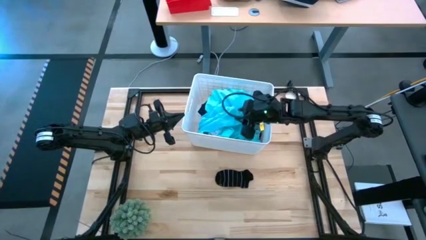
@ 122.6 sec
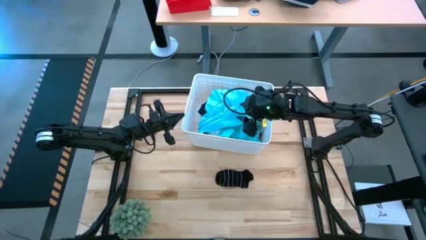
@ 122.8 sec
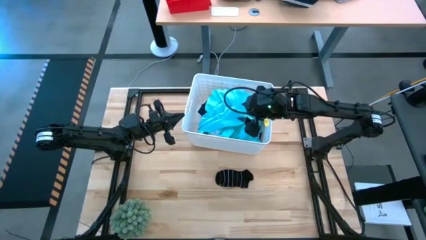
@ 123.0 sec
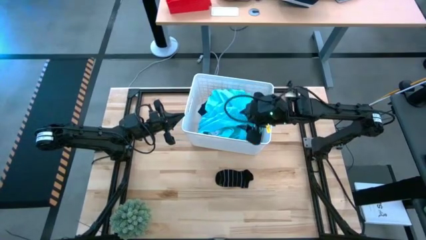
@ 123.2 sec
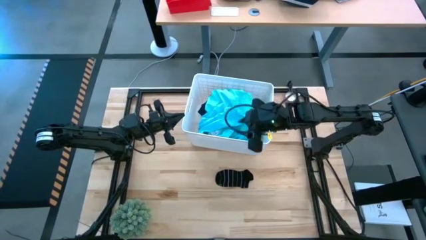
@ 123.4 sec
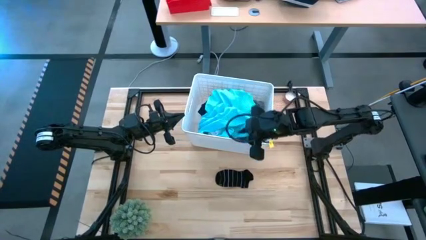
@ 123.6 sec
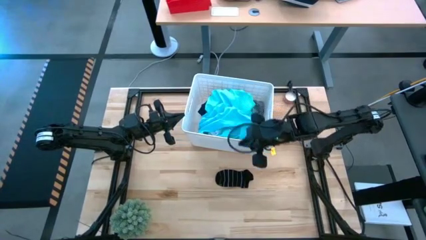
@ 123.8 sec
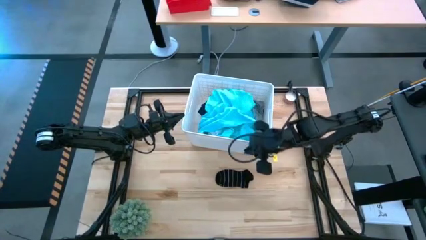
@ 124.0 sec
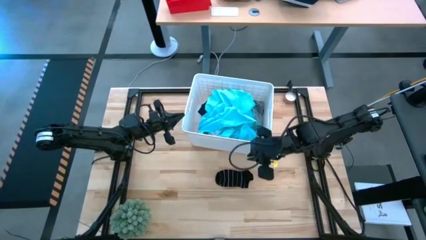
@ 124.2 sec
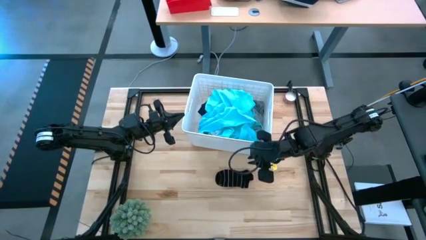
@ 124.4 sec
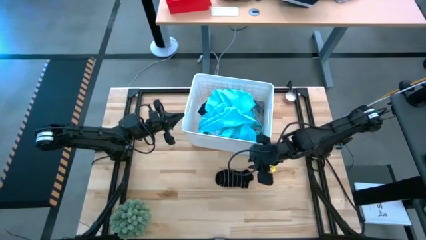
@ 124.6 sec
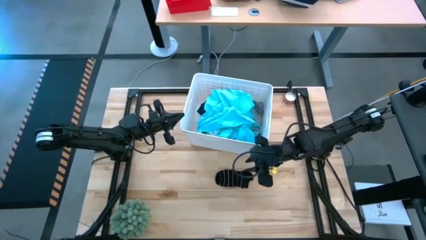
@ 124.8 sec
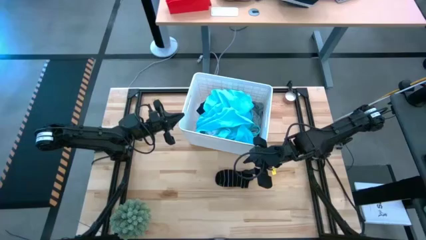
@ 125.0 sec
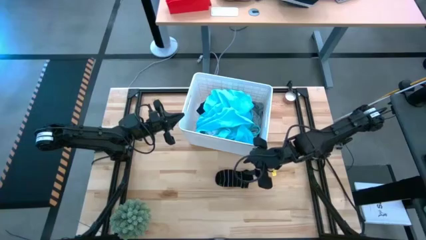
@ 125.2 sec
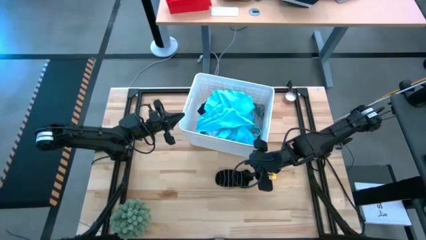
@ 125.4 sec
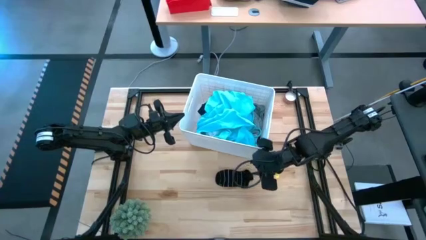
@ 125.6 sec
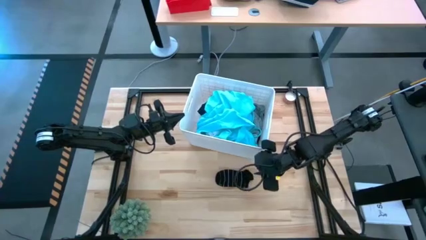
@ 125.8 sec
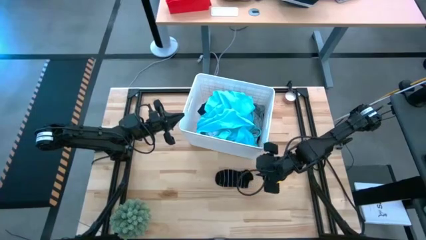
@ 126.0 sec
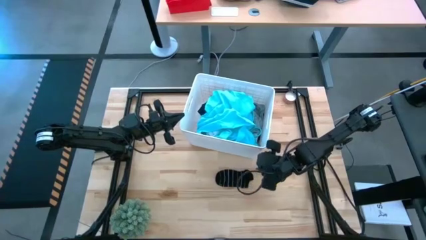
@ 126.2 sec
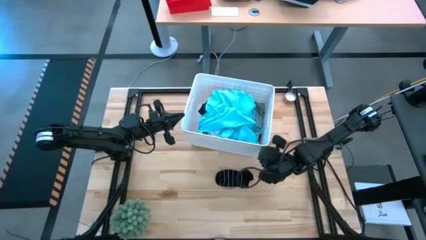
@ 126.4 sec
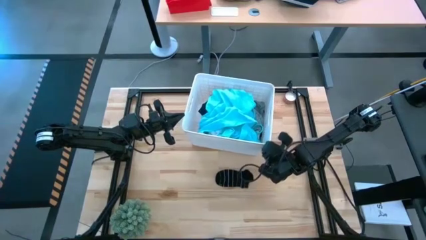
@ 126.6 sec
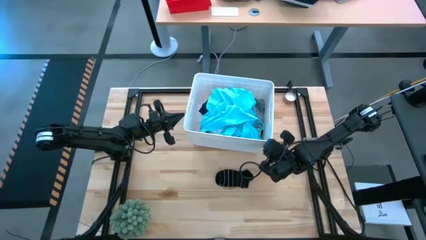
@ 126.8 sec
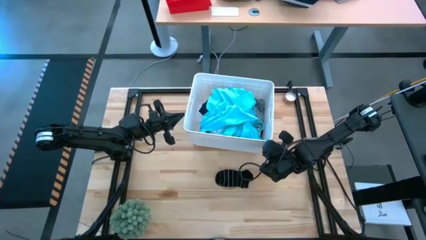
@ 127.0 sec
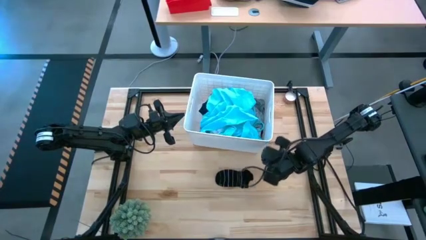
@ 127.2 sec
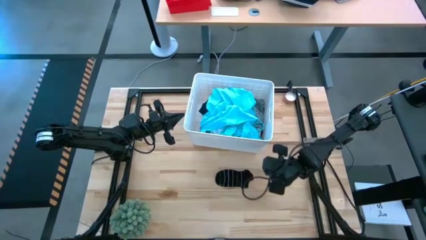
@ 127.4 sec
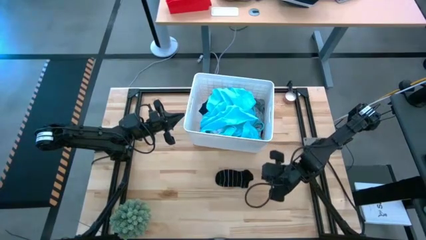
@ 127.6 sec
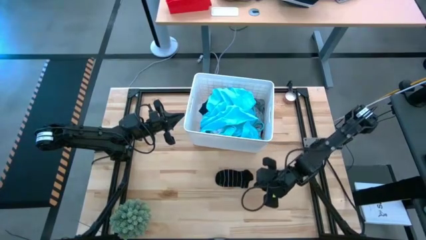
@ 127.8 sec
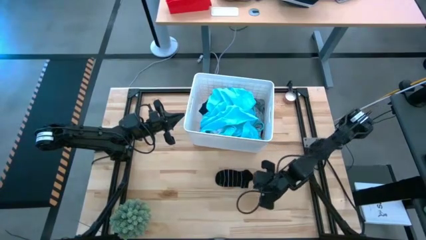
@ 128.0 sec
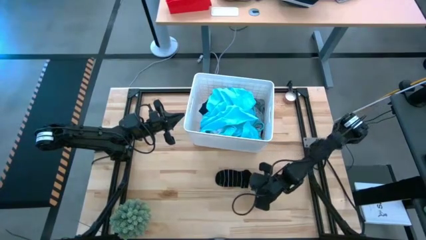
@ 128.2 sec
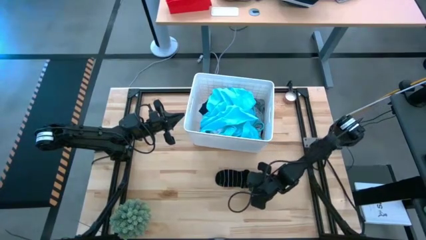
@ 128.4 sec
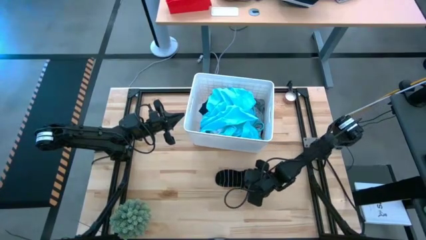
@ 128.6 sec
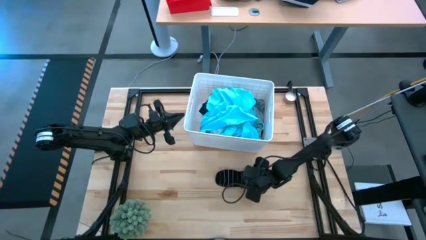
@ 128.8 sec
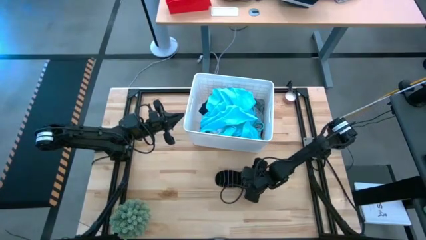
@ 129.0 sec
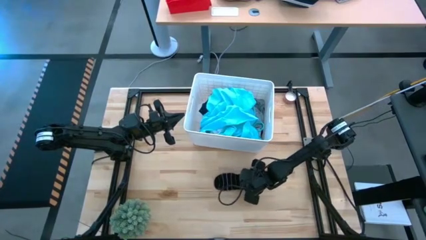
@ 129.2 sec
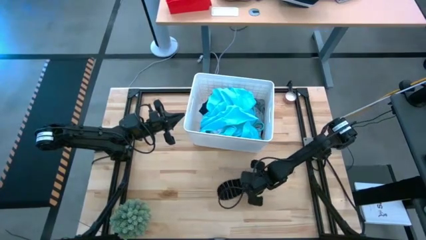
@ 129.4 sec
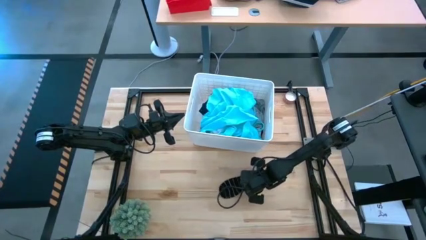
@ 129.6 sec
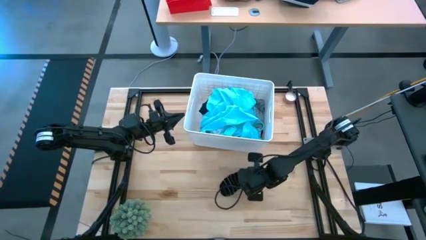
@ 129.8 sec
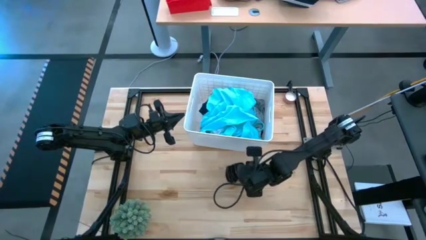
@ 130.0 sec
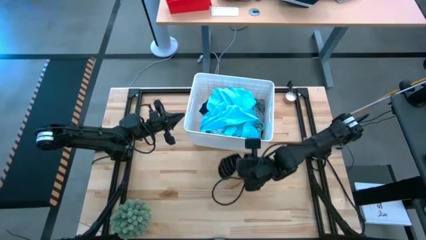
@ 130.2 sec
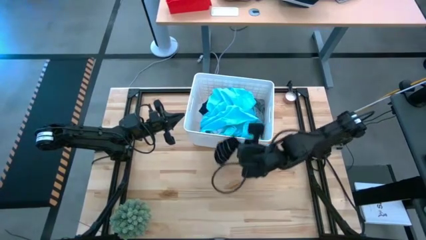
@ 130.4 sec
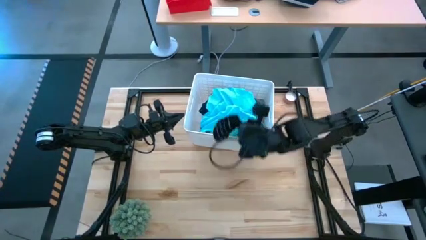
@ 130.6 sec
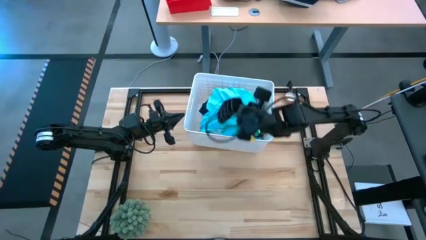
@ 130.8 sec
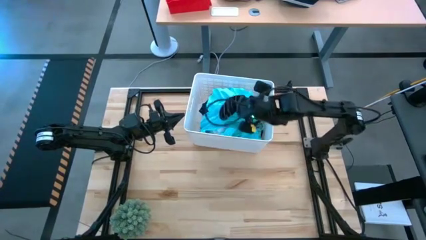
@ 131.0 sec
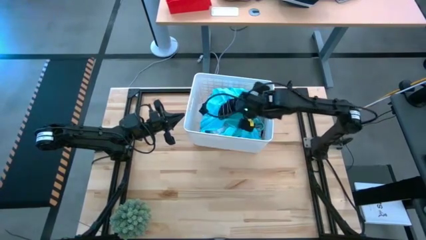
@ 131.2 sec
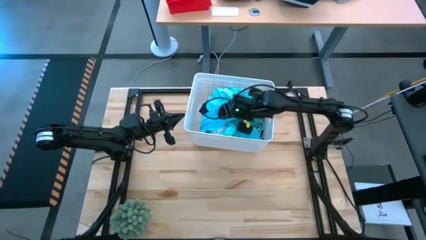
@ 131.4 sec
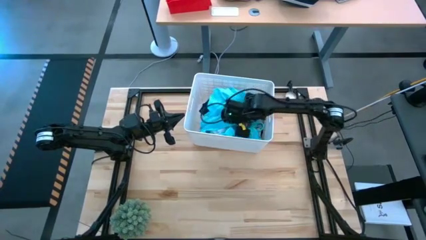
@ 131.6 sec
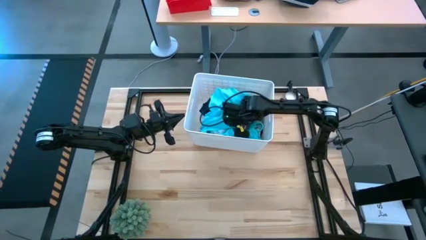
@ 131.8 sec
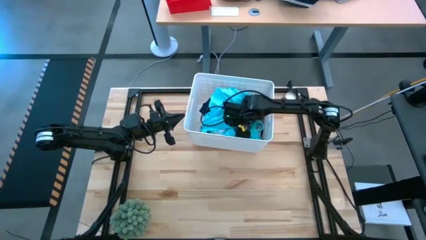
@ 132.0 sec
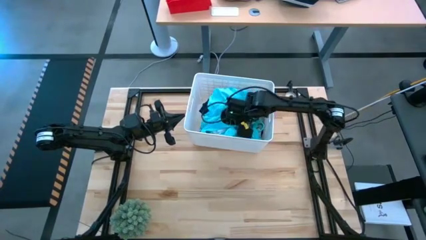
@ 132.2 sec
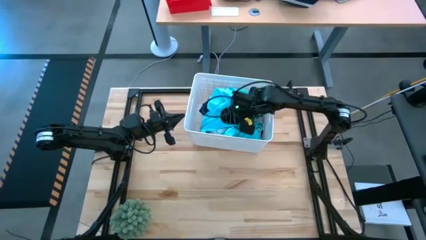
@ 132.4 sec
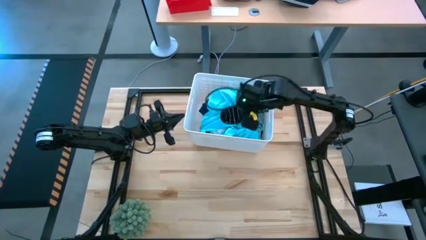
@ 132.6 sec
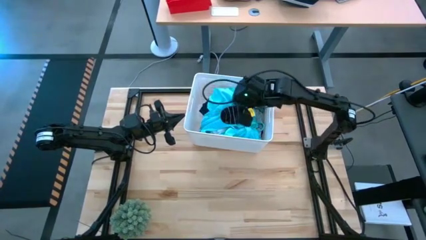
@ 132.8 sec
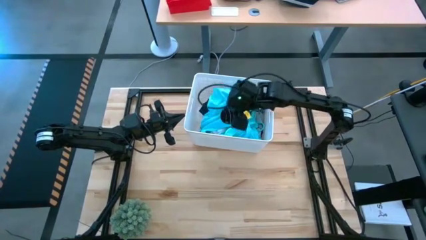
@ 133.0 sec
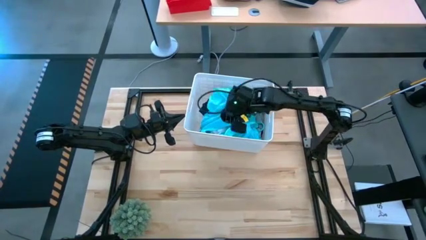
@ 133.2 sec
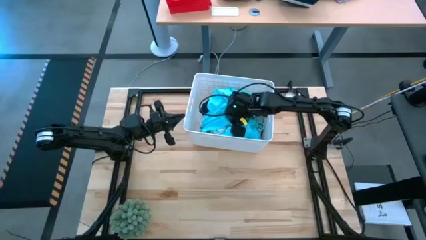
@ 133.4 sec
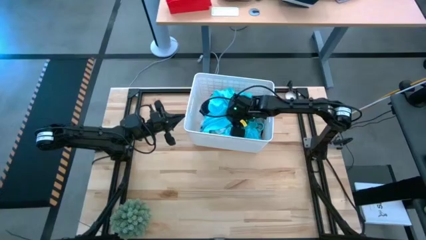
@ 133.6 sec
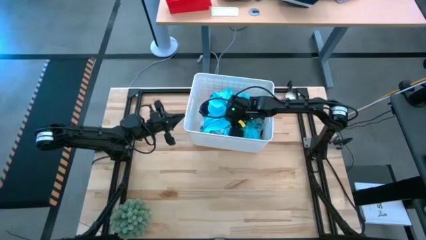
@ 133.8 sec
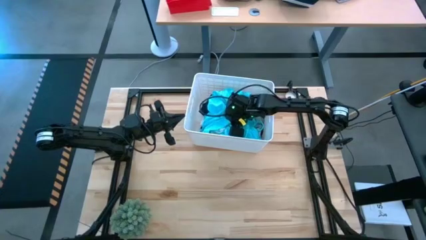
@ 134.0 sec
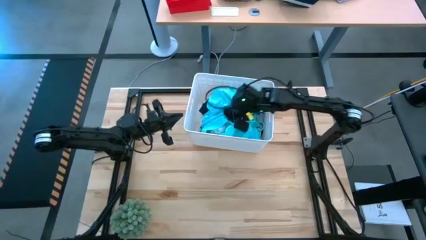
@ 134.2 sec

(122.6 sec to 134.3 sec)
Task: Sort clothes
Put the black socks into the white bin

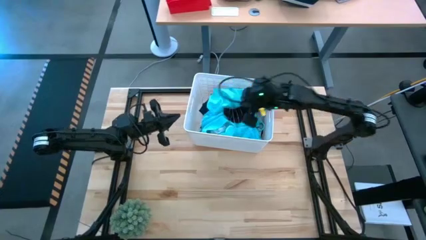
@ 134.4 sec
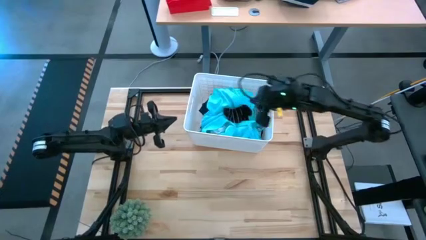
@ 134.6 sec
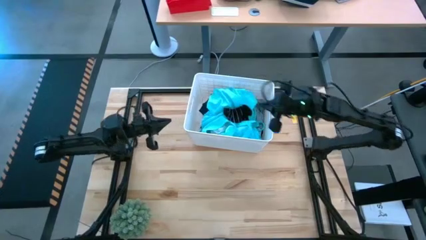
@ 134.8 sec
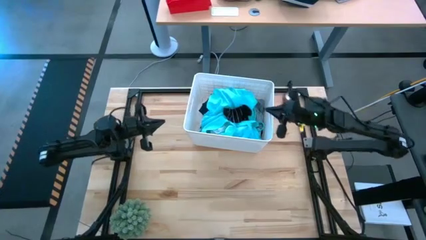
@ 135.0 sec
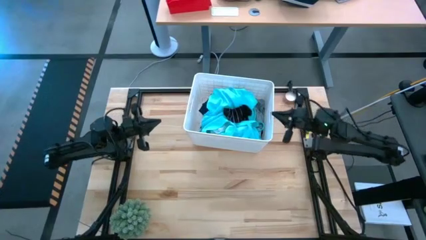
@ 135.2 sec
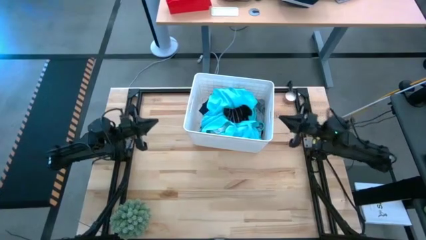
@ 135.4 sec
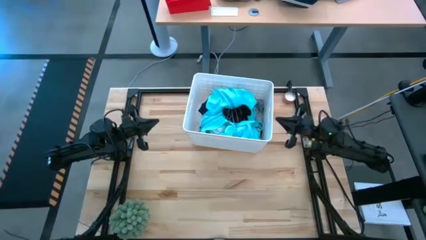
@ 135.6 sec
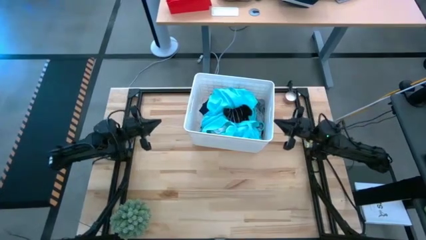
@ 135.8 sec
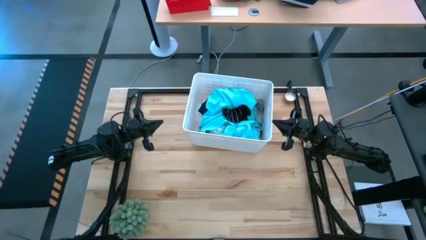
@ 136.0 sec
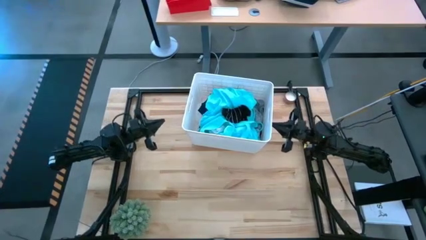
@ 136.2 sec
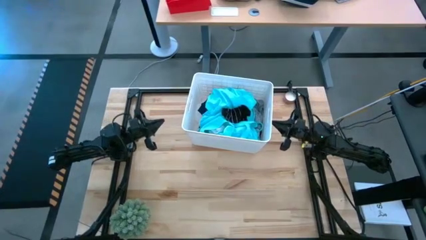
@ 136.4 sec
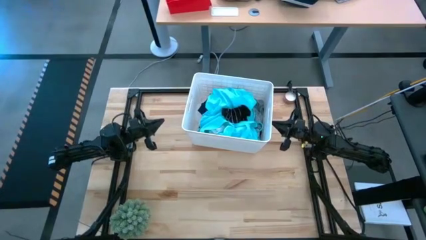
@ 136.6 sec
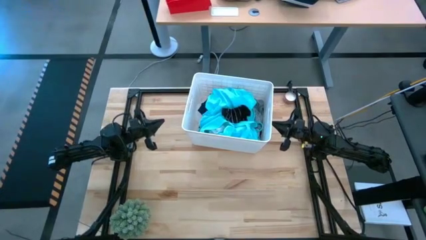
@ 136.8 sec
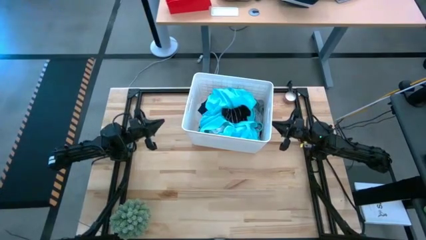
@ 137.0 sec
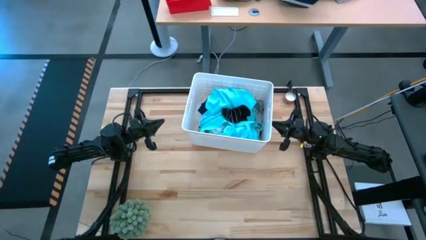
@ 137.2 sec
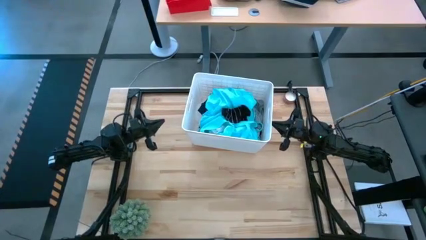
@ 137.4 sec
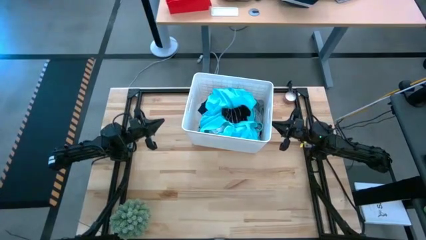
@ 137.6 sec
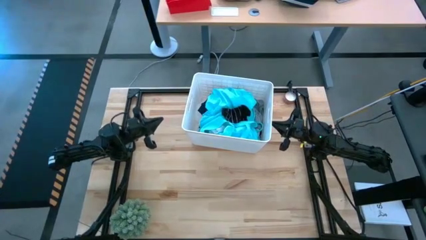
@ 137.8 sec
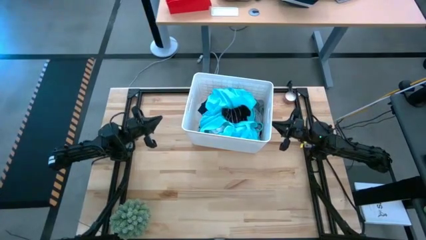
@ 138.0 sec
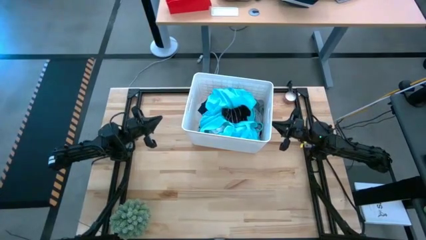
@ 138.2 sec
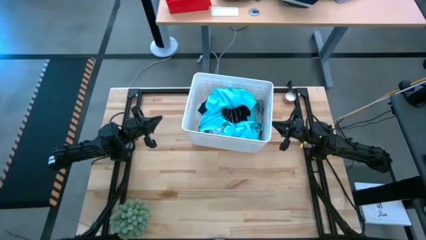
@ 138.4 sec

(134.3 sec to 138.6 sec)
Return to Home Position
